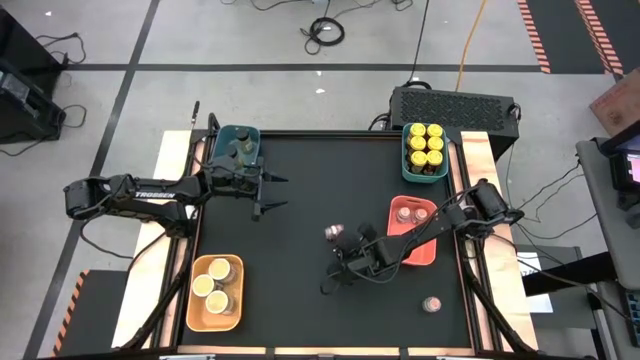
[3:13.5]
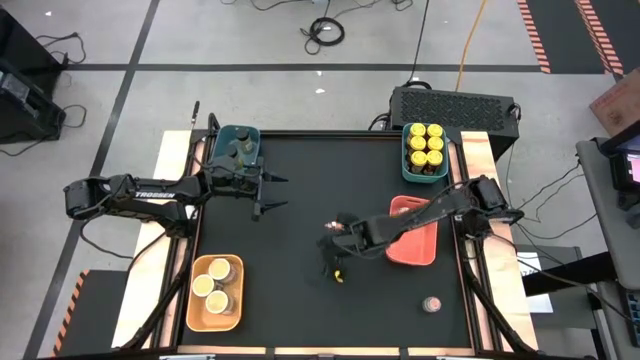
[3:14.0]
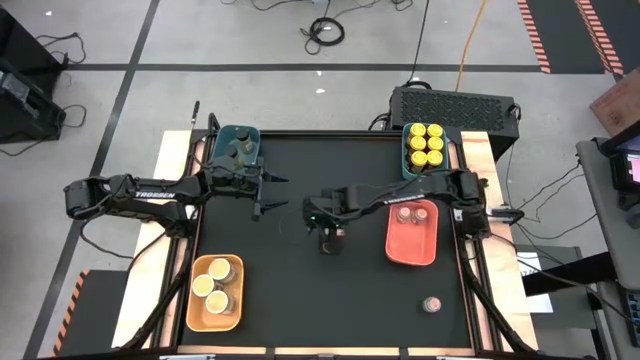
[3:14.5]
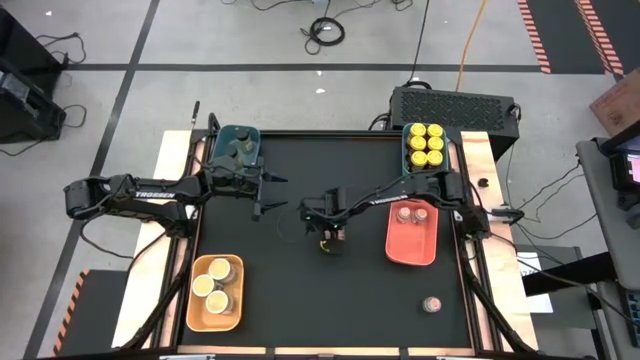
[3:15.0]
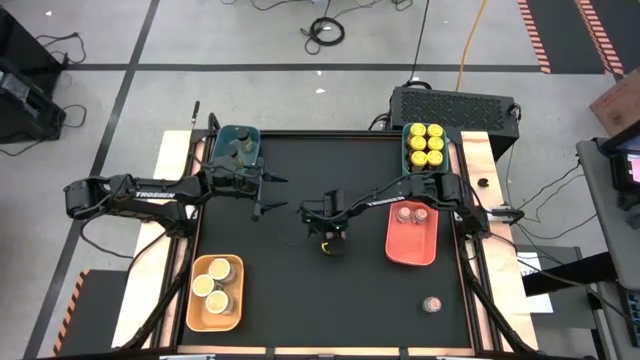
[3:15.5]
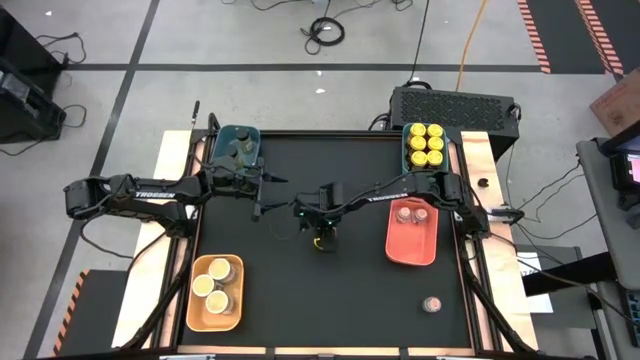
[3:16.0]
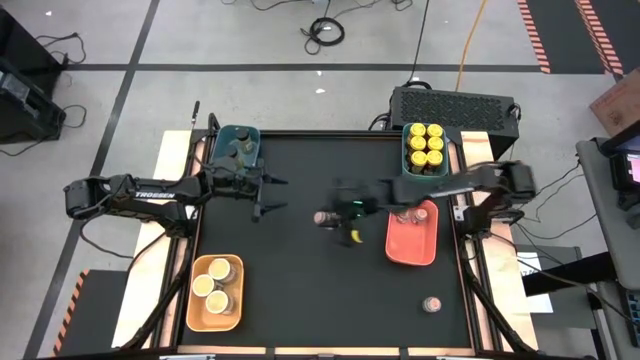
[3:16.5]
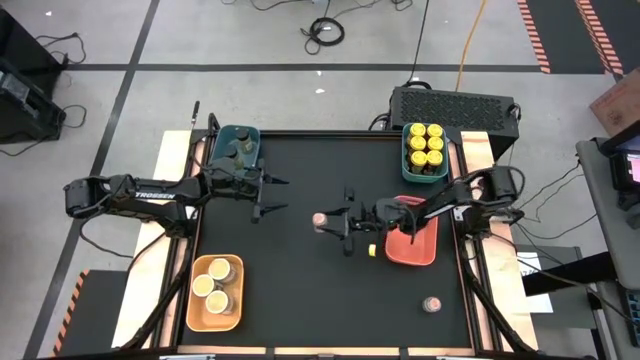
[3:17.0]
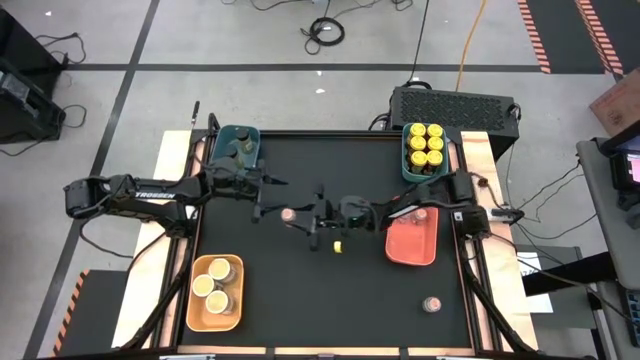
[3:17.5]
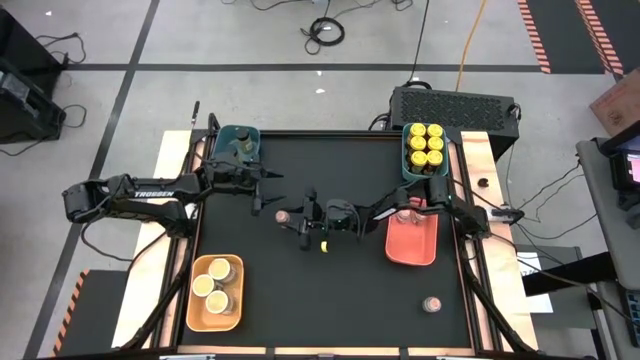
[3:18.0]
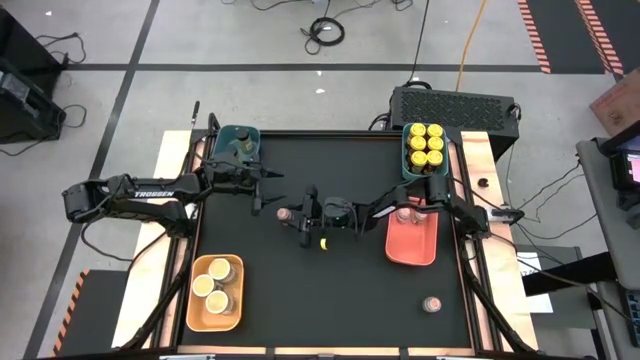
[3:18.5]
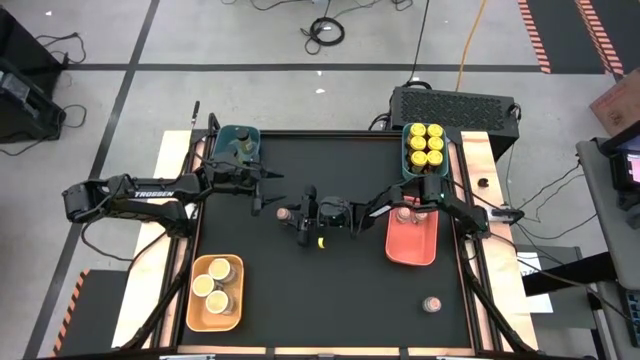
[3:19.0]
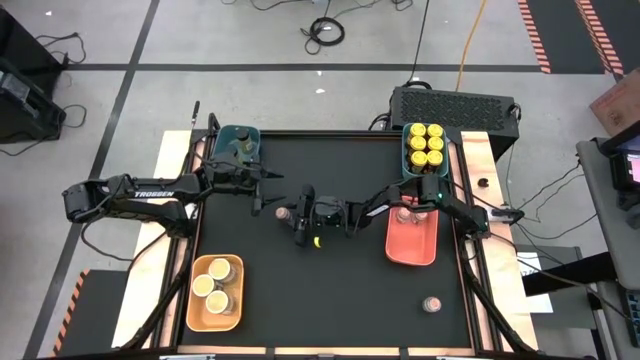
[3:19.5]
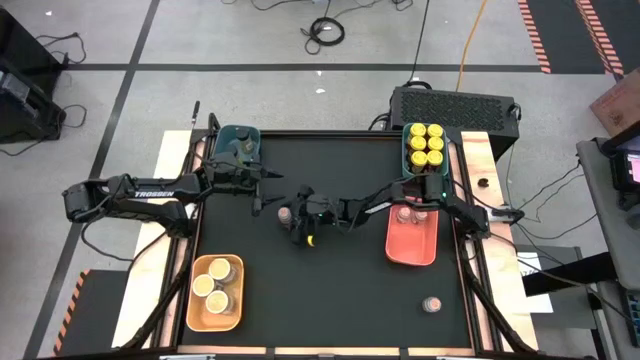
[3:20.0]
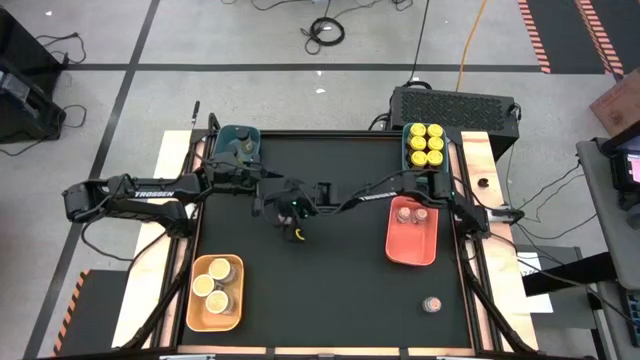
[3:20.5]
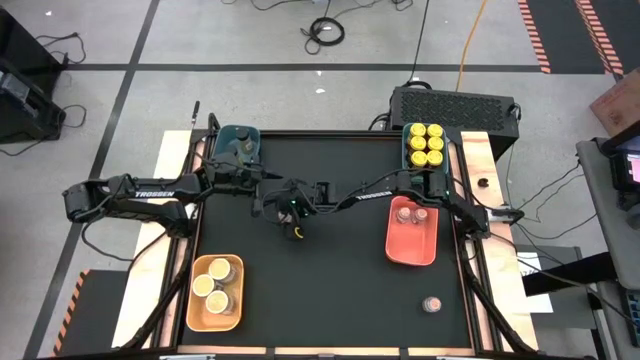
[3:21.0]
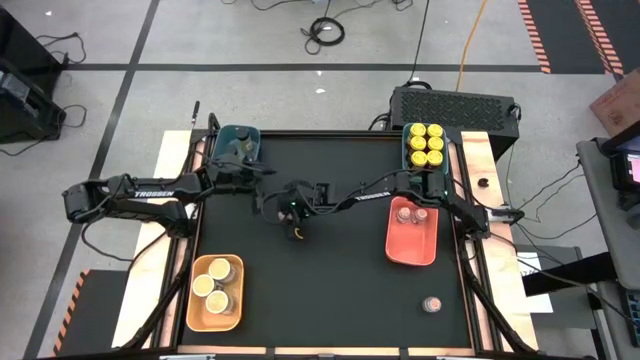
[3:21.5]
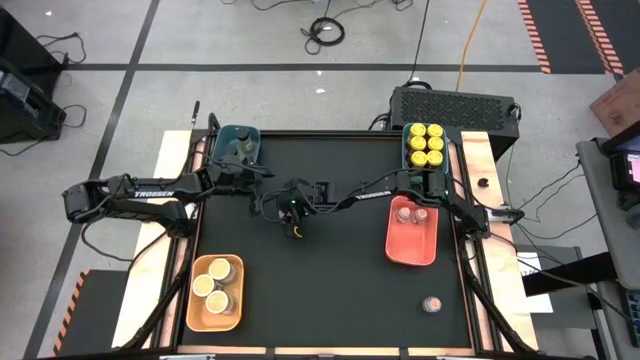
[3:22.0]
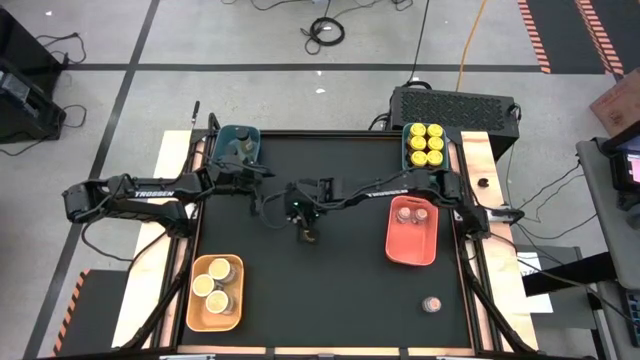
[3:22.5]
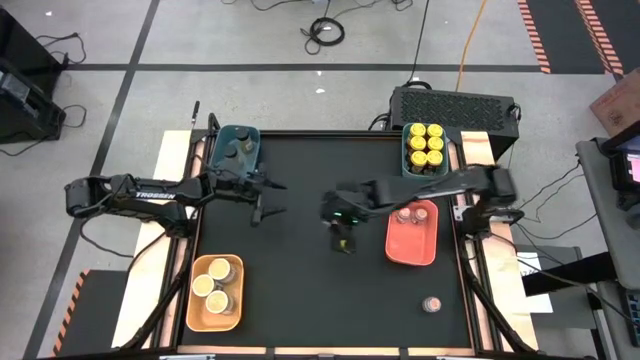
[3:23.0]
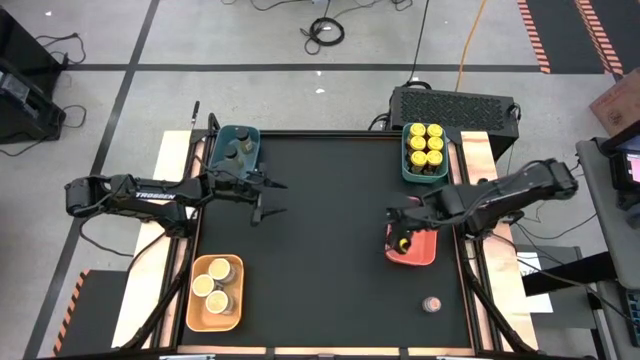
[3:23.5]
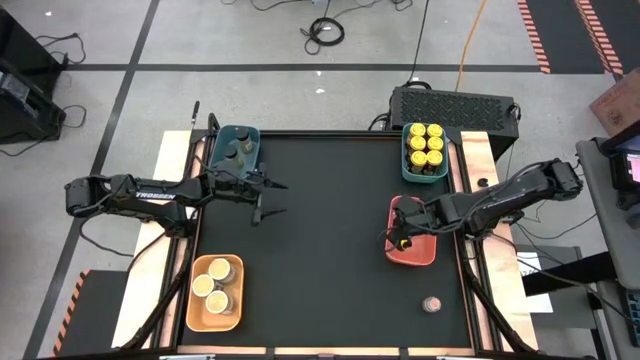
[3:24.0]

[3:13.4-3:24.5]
Task: Sort spices by type
Adjust the brown spice bottle into the orange bin

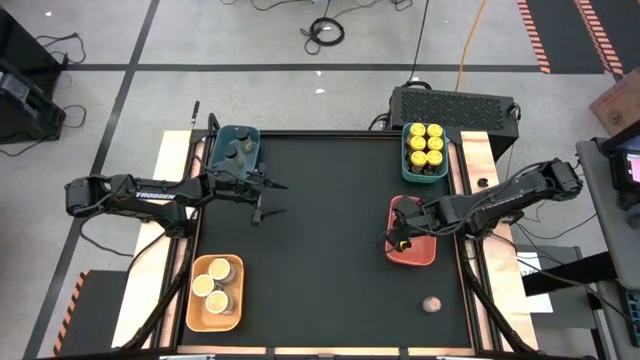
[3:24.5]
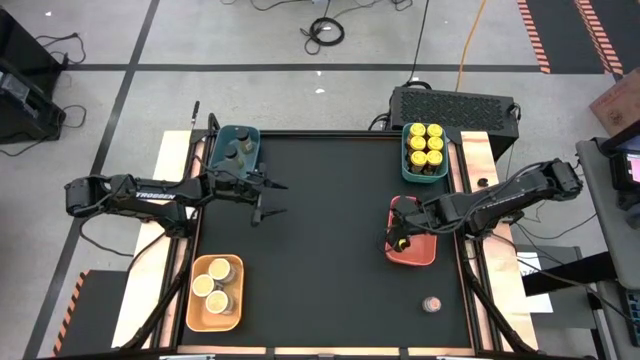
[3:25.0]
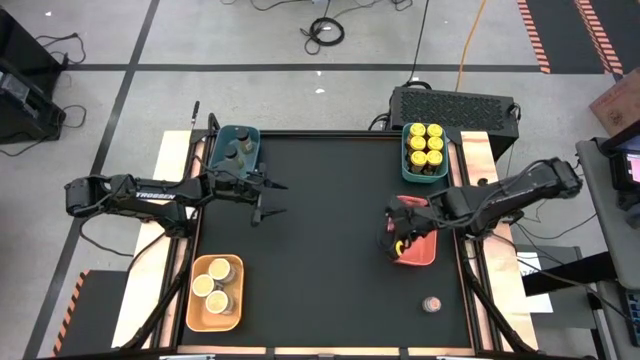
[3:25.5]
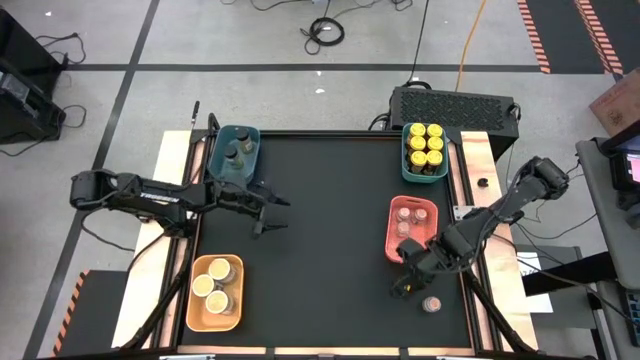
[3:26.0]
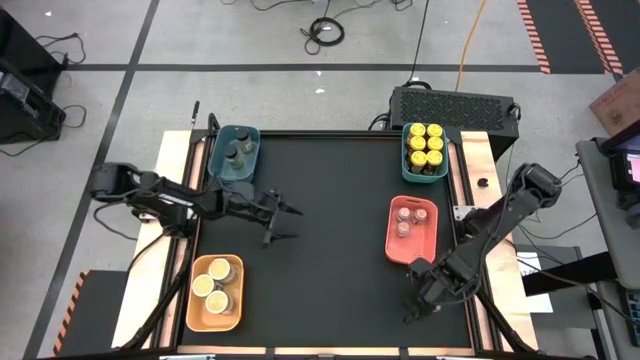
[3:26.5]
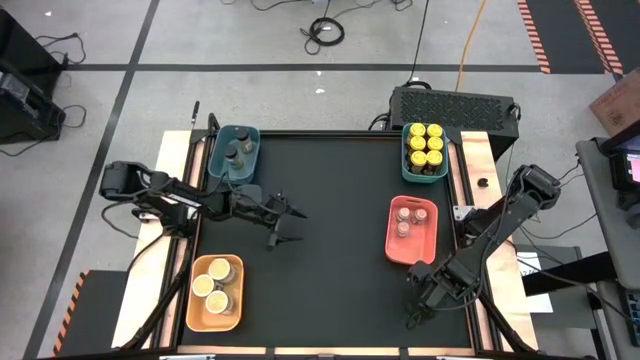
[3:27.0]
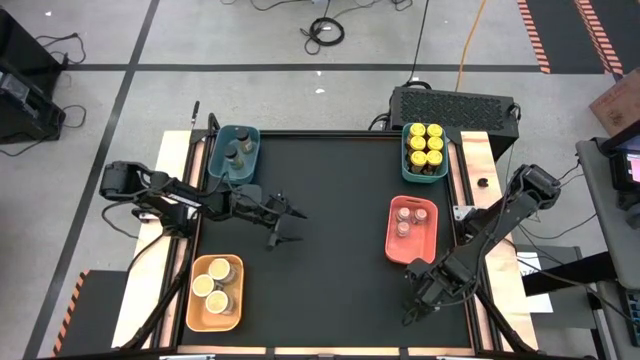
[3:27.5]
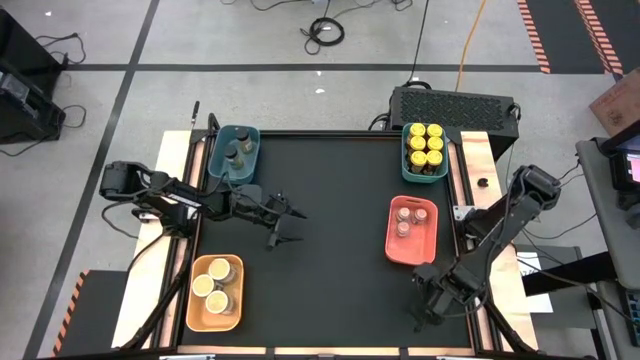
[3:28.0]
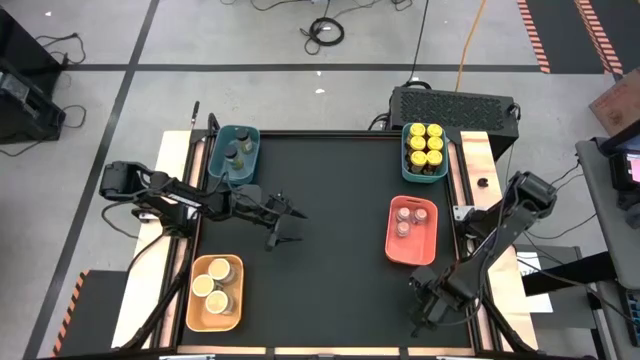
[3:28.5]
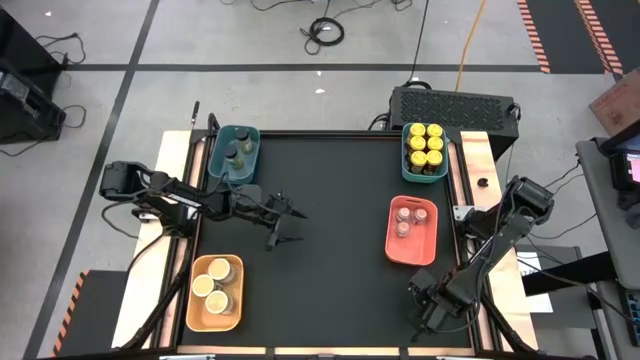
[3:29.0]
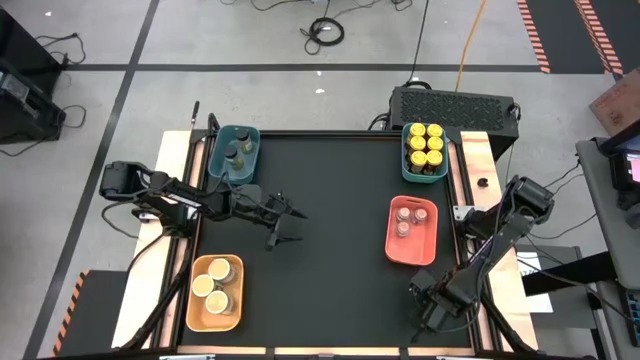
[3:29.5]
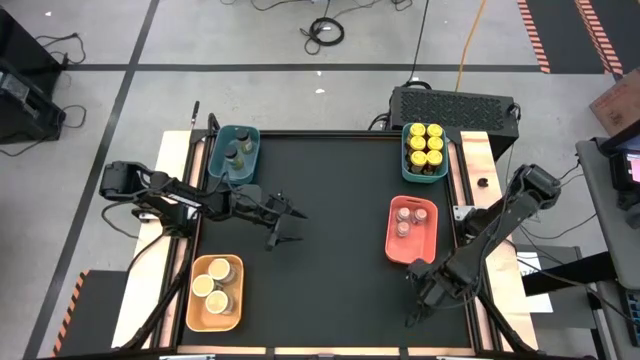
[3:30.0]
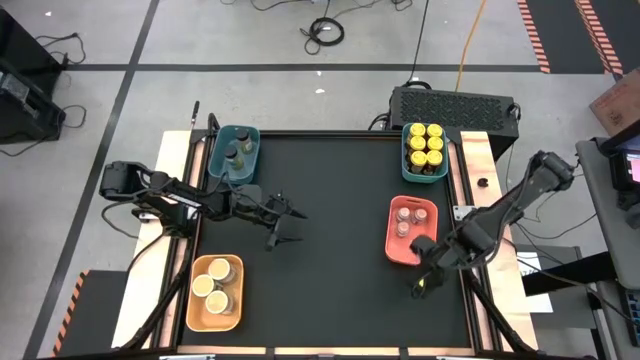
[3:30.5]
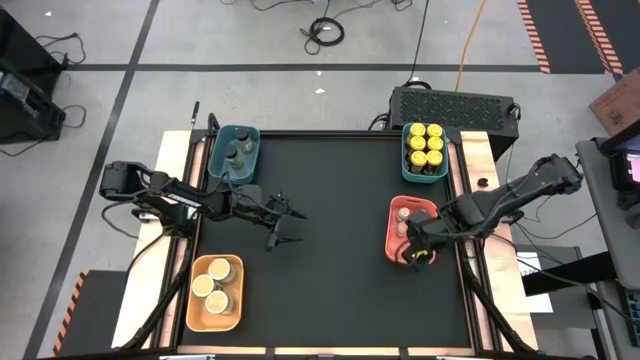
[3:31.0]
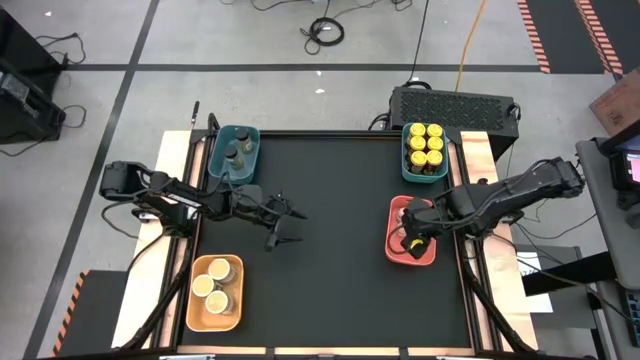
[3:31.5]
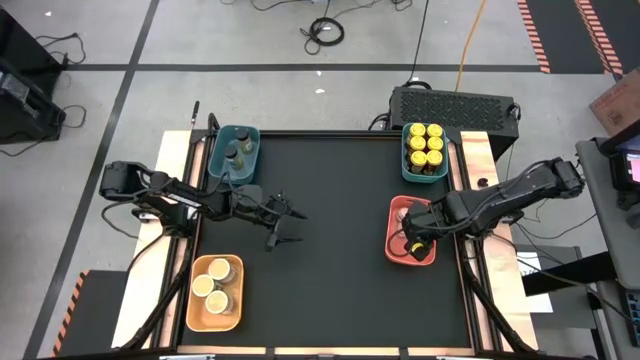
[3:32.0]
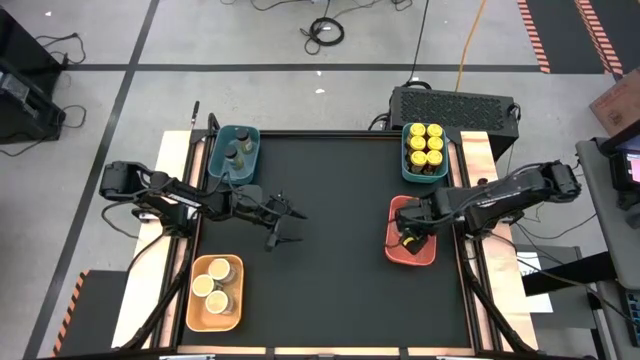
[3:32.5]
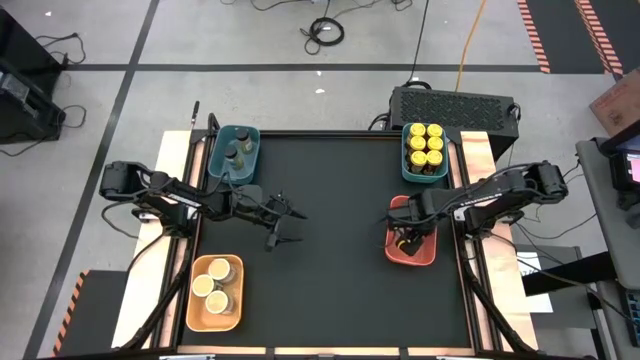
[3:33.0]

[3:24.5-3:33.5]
Put the brown spice bottle into the orange bin
